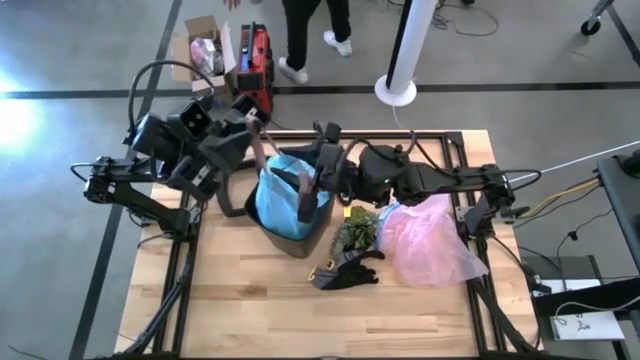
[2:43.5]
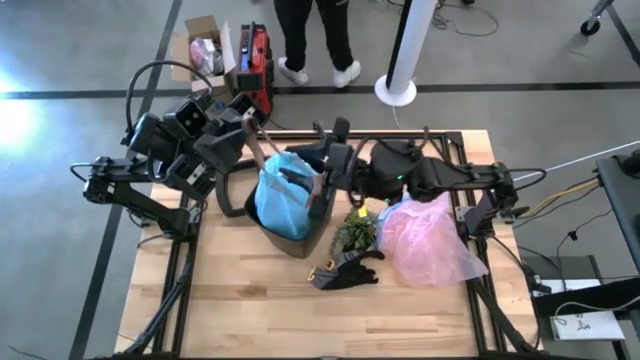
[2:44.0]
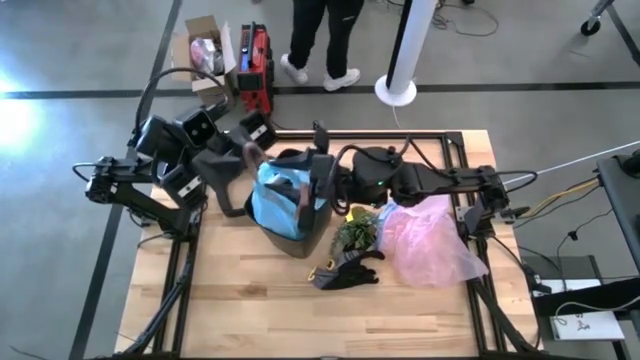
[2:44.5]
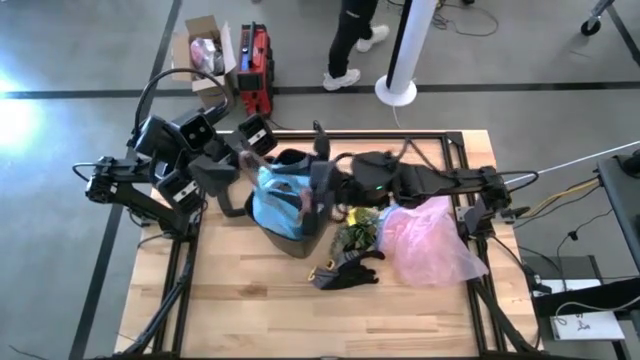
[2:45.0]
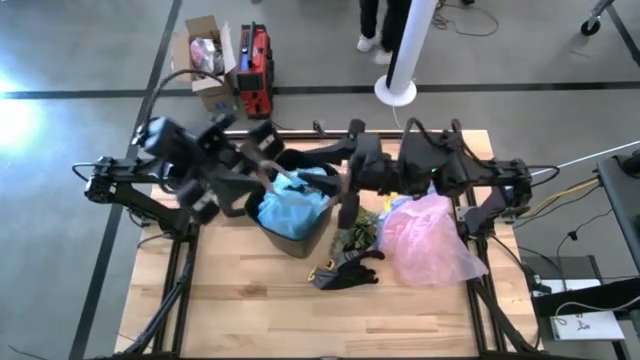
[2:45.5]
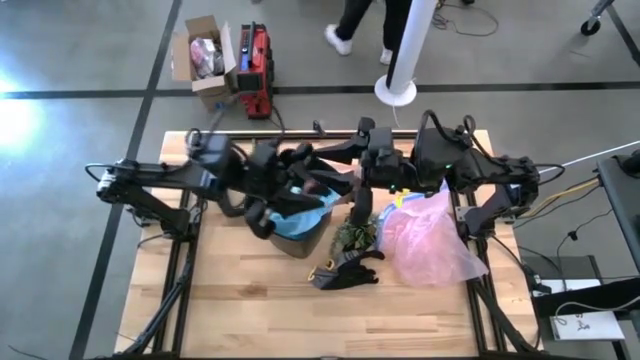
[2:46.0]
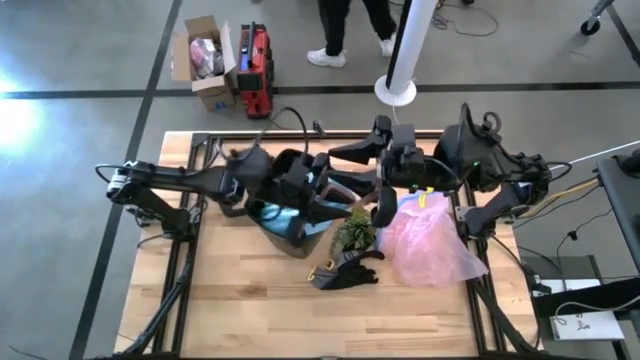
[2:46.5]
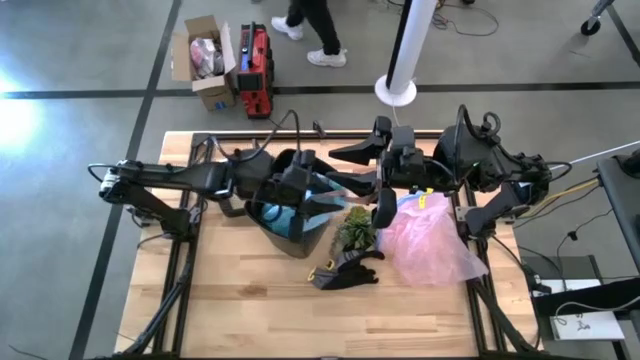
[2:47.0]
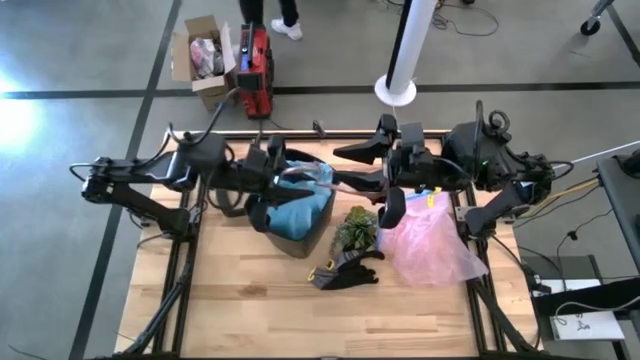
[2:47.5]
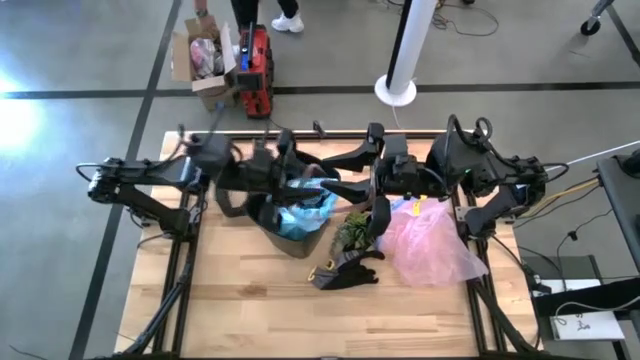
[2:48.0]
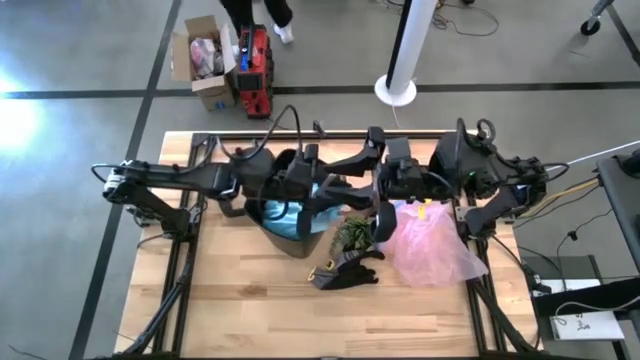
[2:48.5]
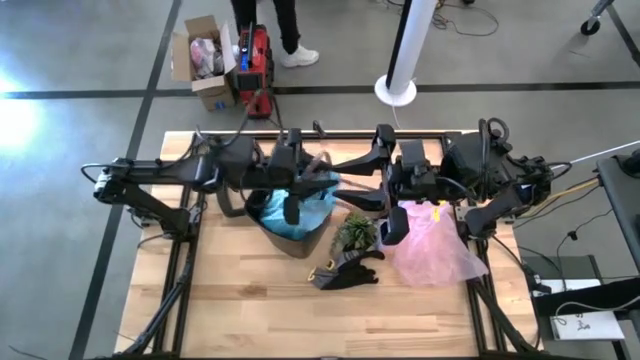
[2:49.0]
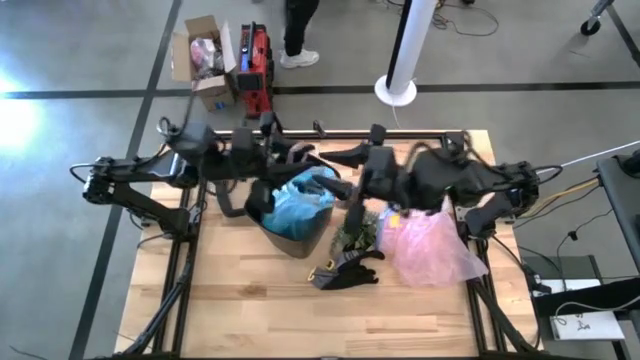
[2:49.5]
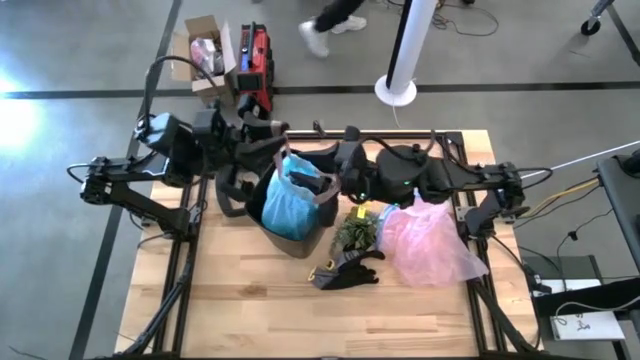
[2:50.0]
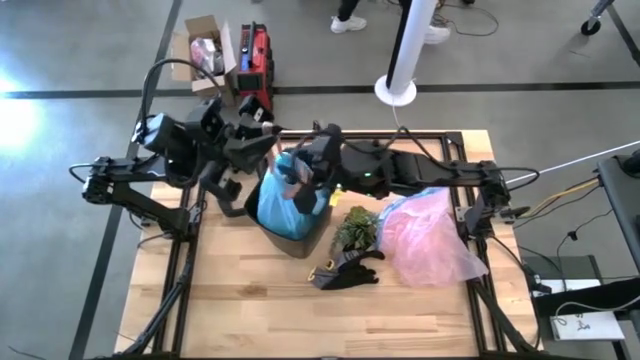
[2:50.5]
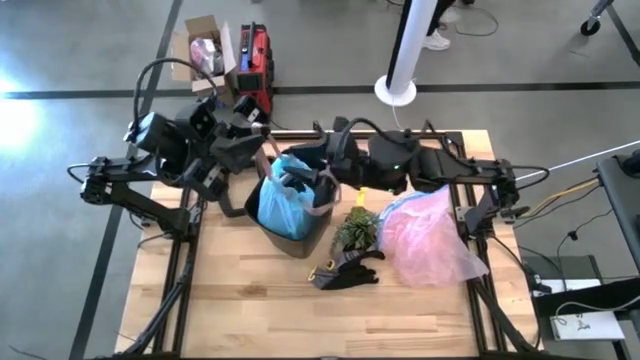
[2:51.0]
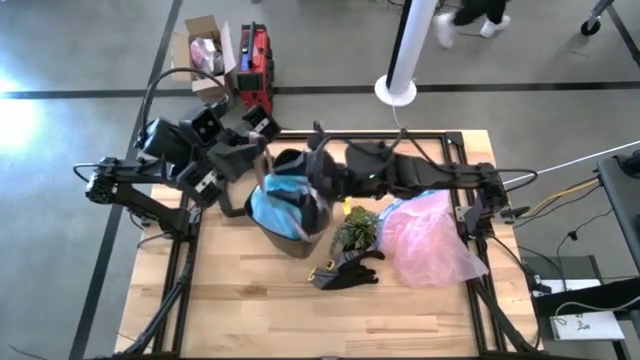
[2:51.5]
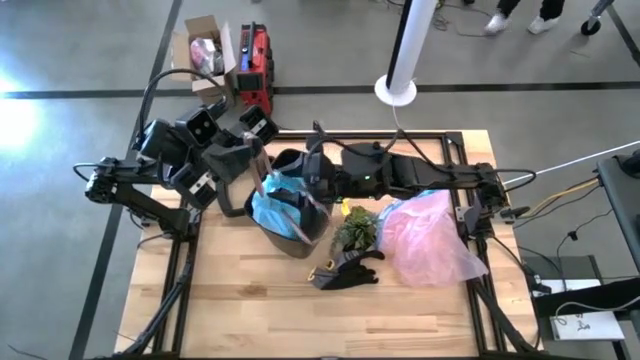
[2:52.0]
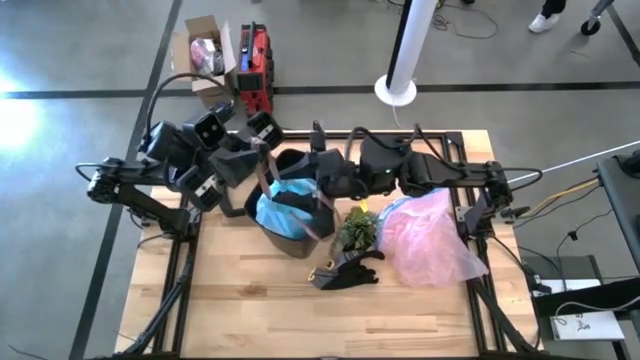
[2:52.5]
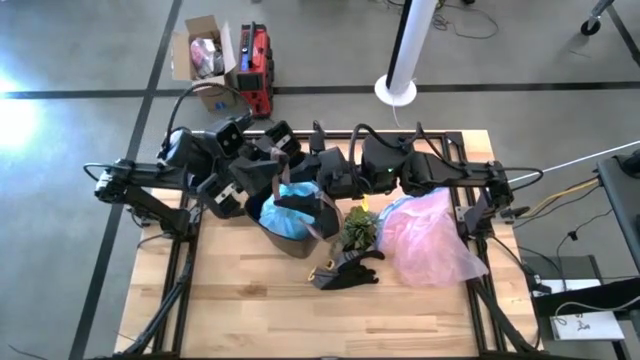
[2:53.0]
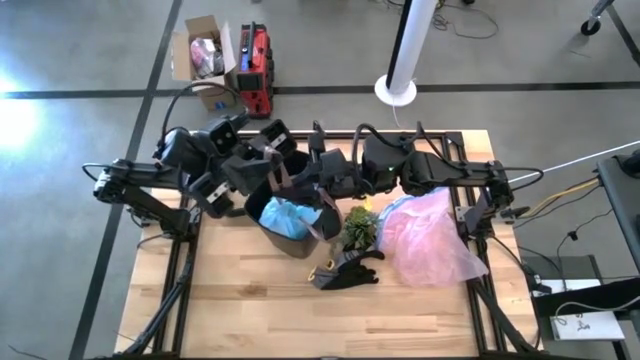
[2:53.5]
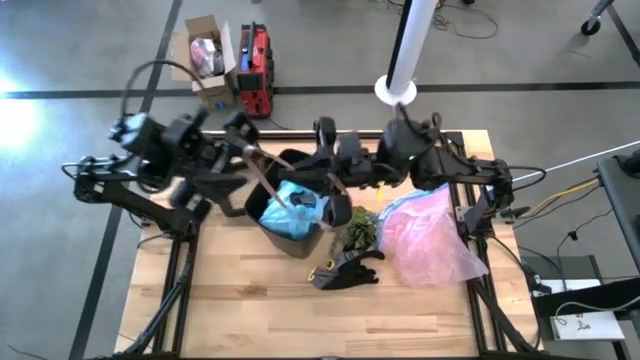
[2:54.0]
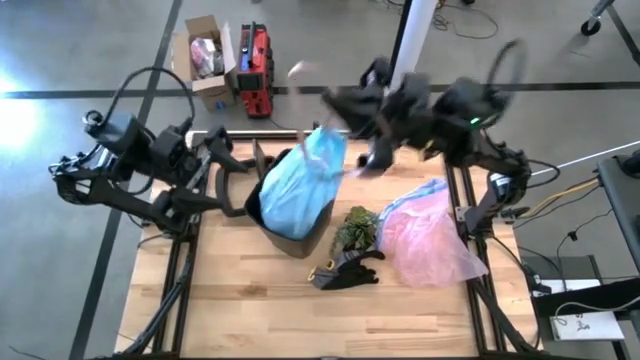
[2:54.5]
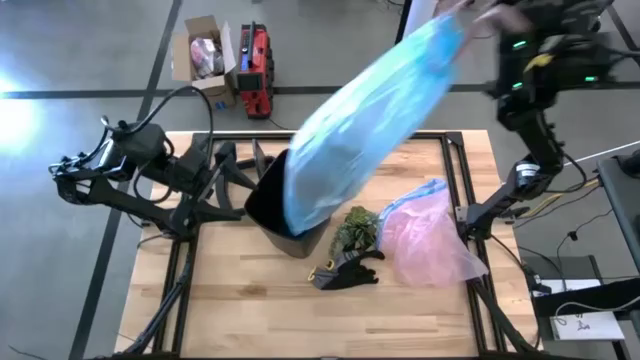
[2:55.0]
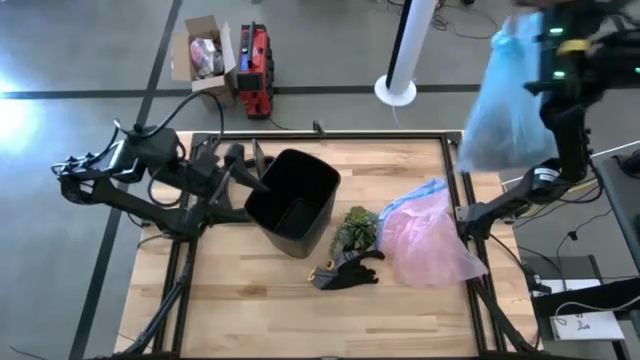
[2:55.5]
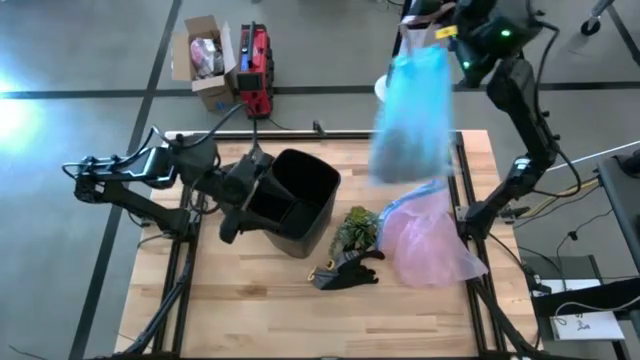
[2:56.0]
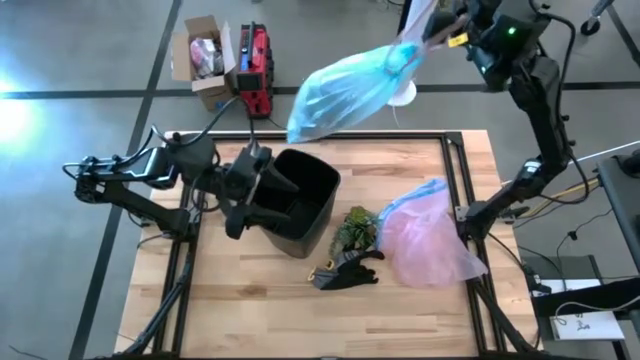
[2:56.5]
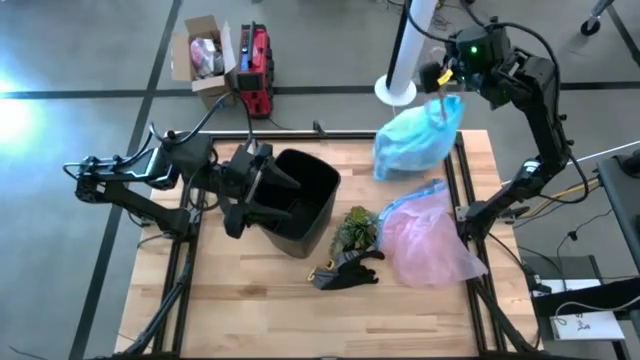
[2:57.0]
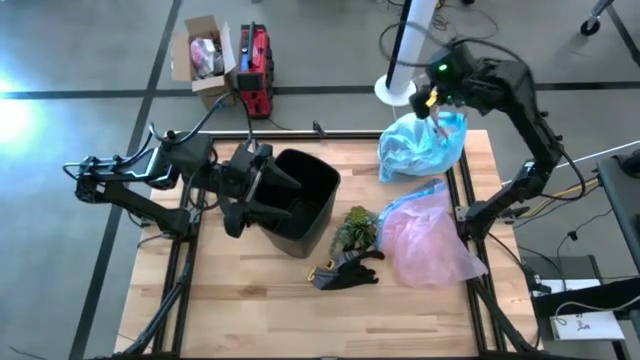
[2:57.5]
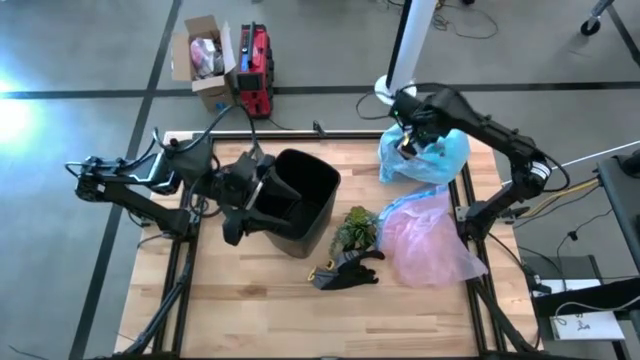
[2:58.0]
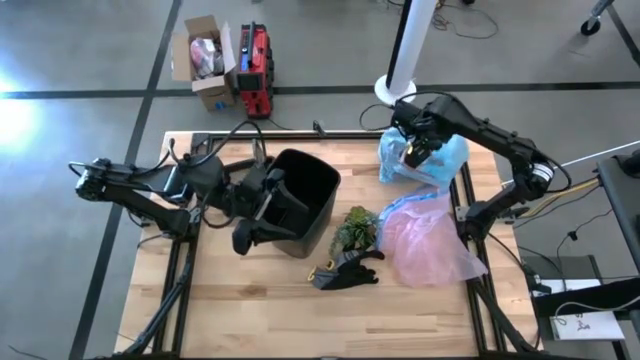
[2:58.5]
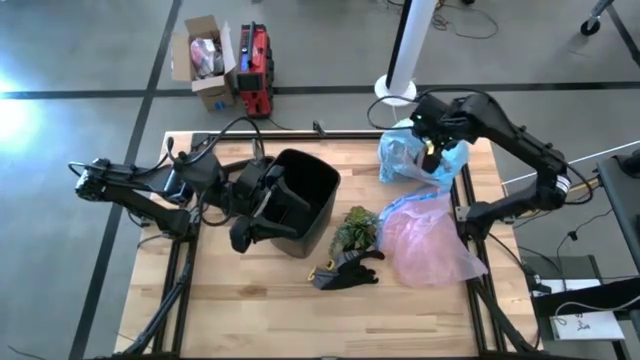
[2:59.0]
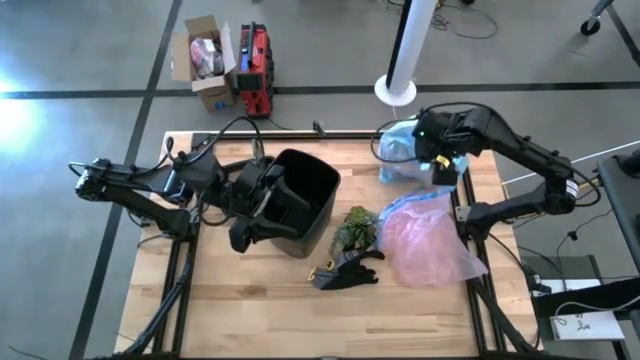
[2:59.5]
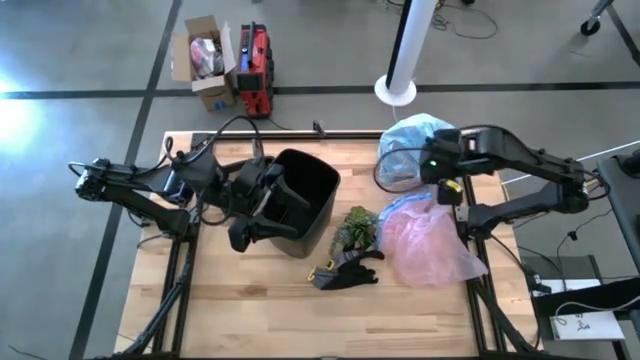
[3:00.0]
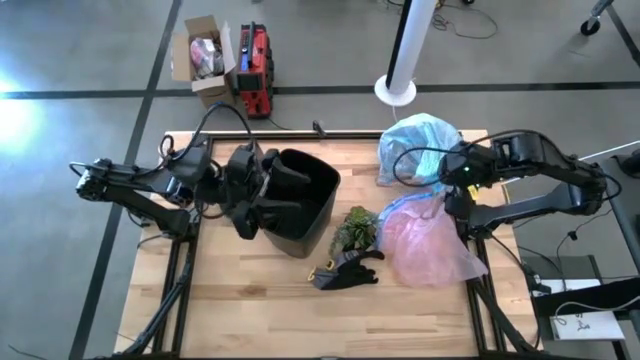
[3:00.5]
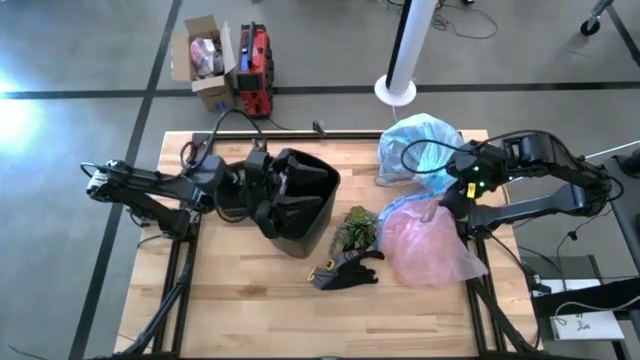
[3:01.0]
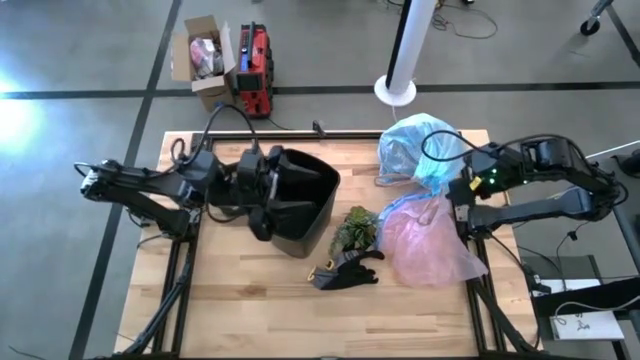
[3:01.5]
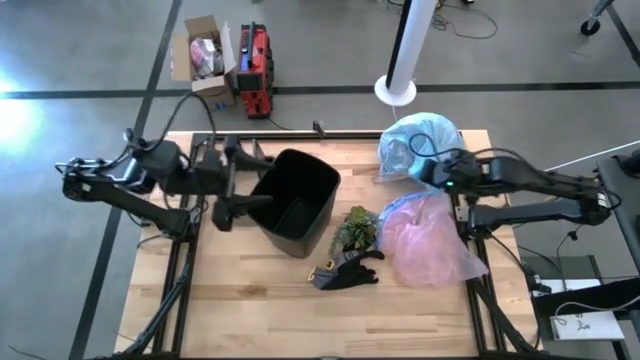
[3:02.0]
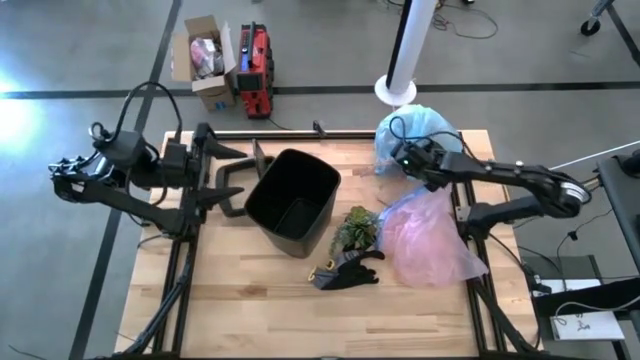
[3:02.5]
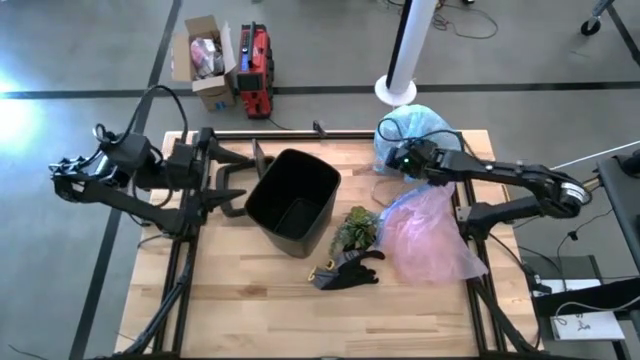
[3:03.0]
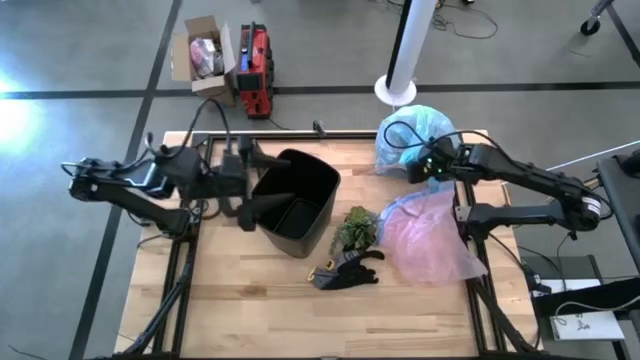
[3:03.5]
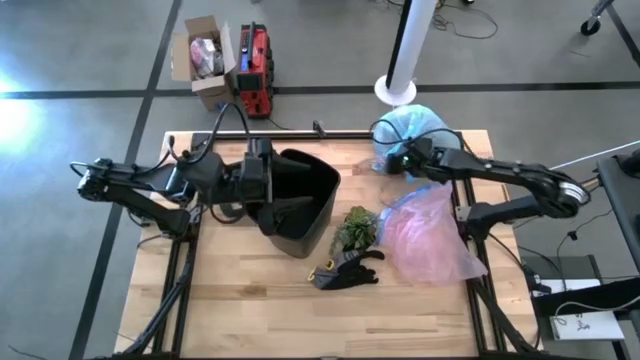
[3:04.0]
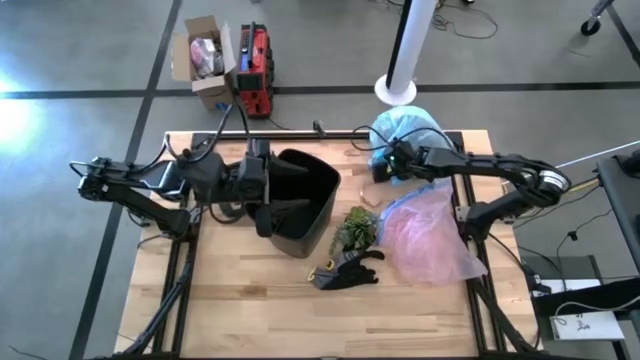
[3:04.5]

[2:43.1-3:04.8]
Task: place trash/remove bag and relplace
Remove trash bag from trash bin
